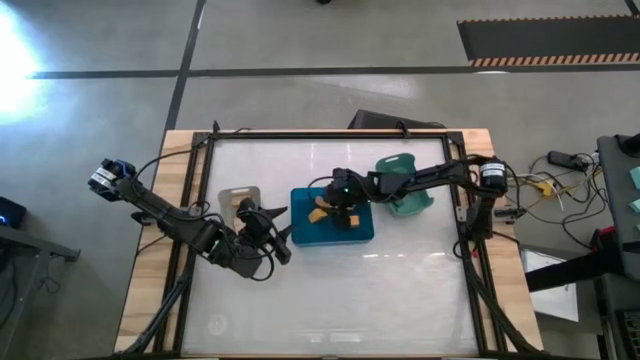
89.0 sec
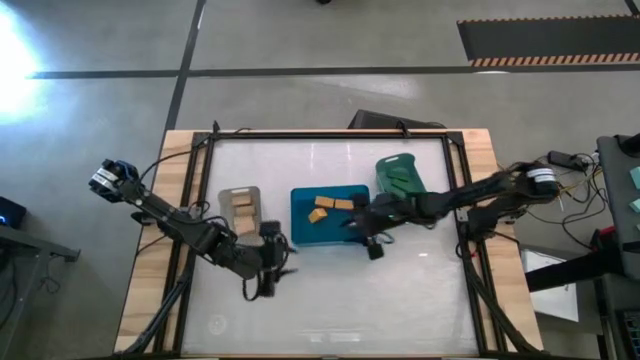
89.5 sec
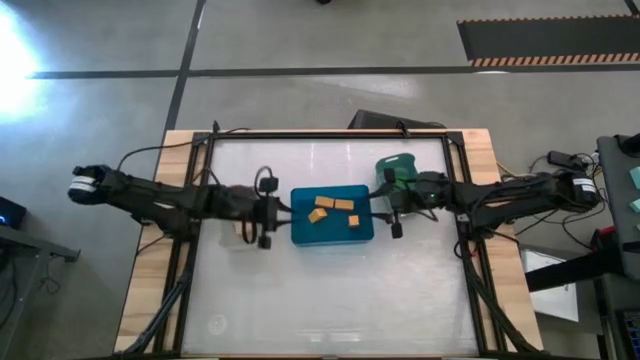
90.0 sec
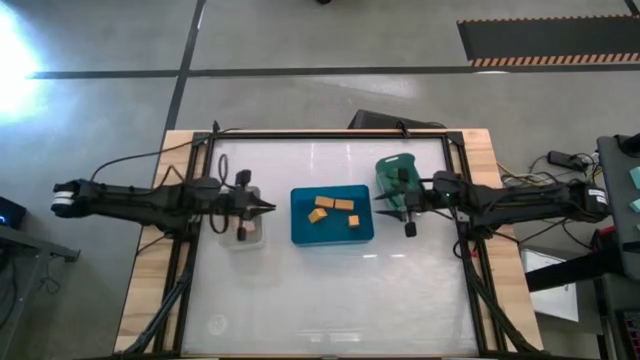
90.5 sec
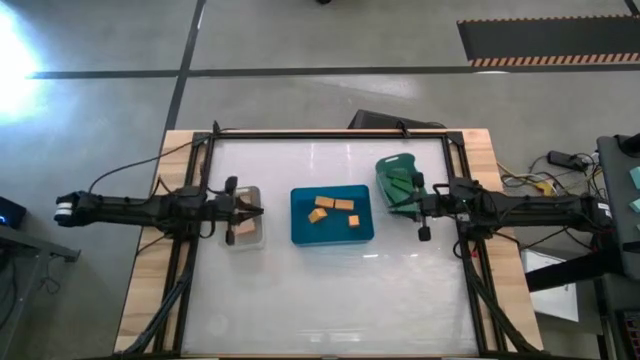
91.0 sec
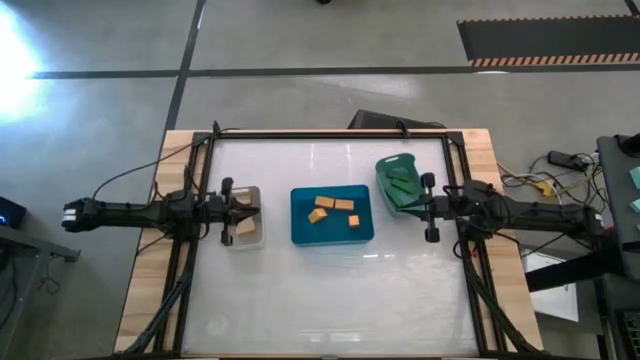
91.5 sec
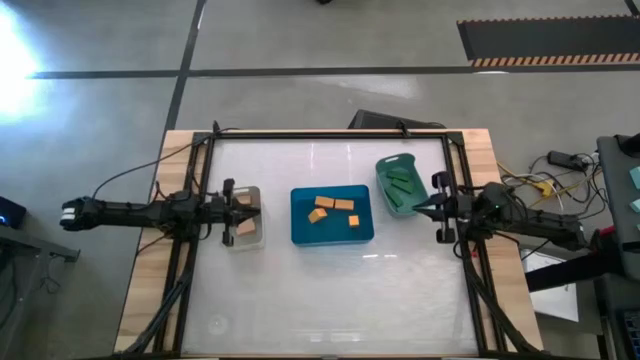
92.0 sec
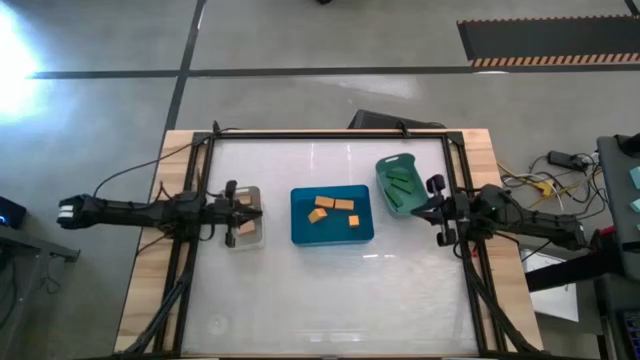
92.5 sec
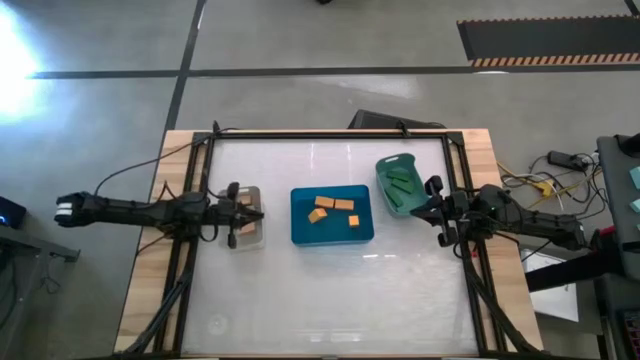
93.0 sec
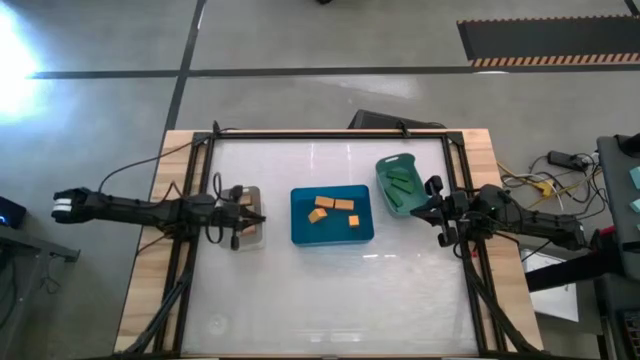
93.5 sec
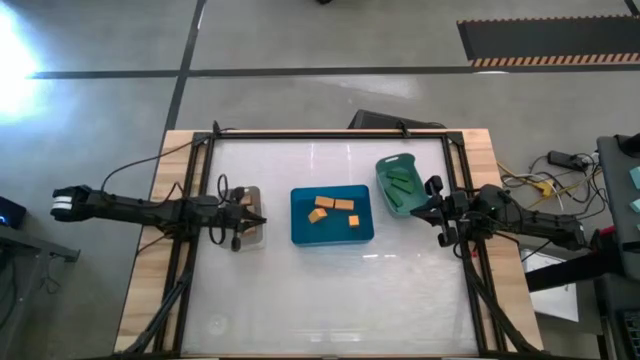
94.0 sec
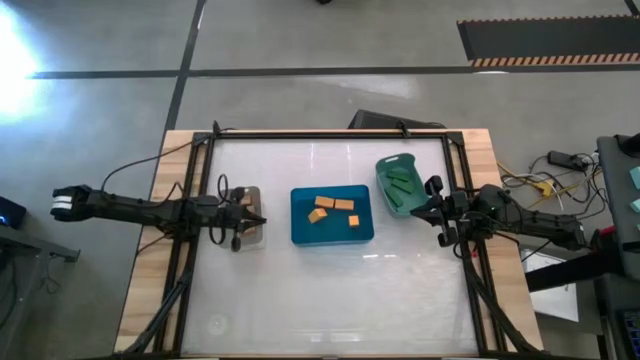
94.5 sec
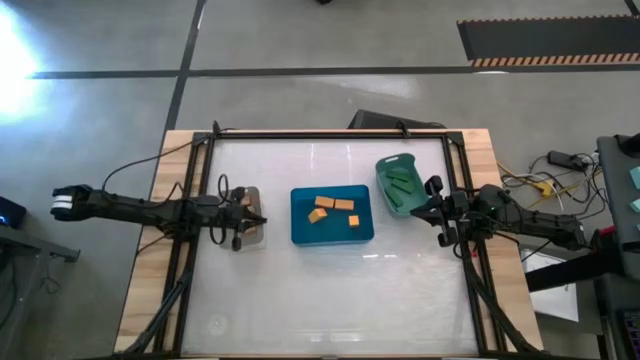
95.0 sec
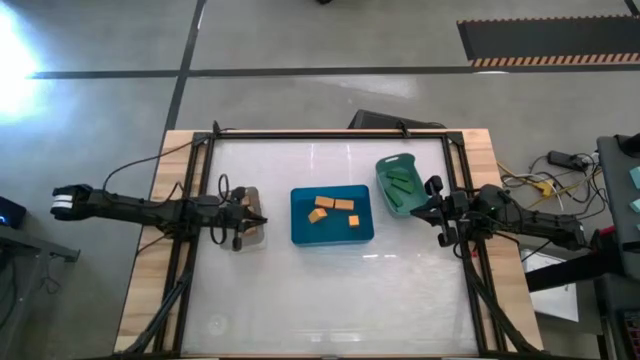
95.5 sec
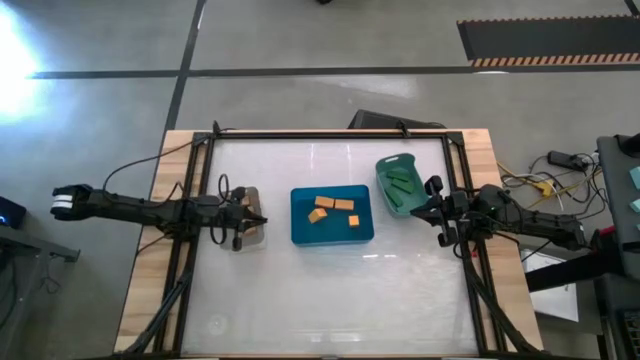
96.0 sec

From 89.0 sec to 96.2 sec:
Task: Sort & place blocks by color
Return to Home Position

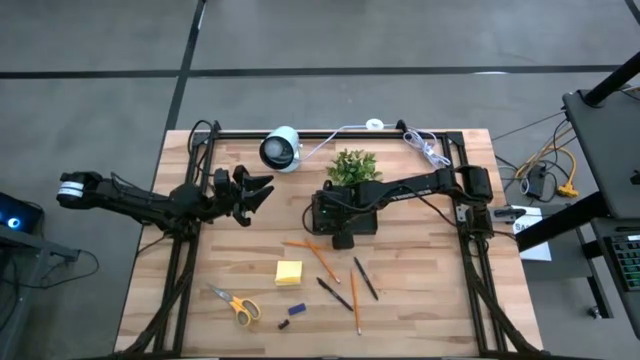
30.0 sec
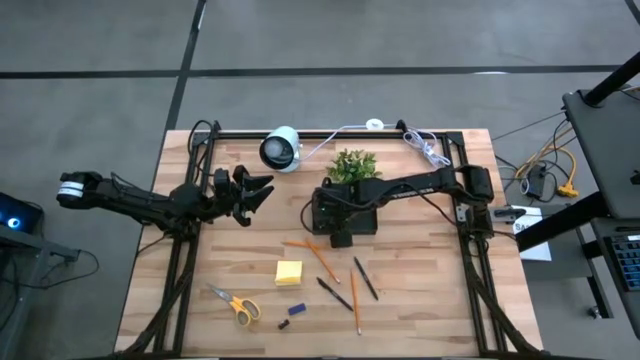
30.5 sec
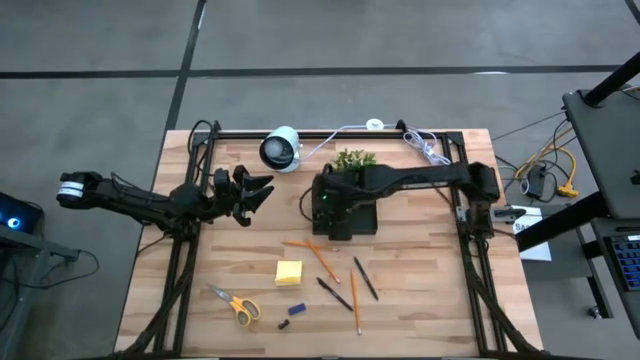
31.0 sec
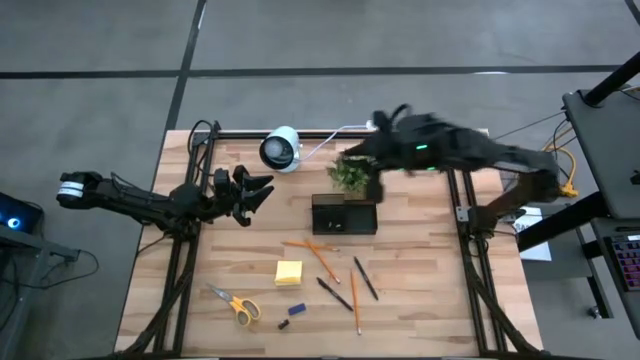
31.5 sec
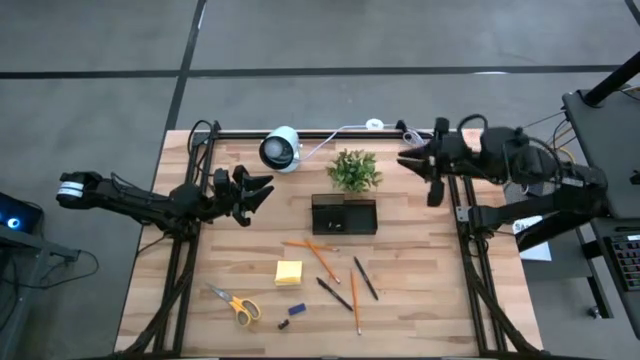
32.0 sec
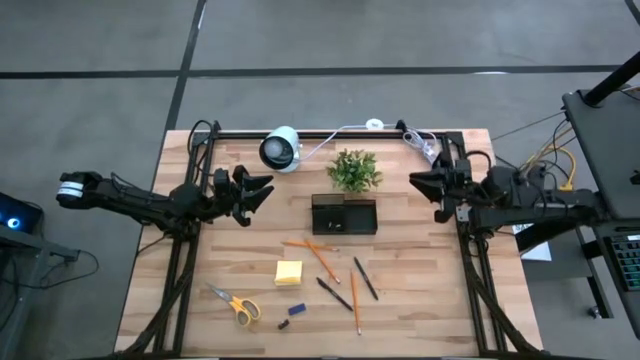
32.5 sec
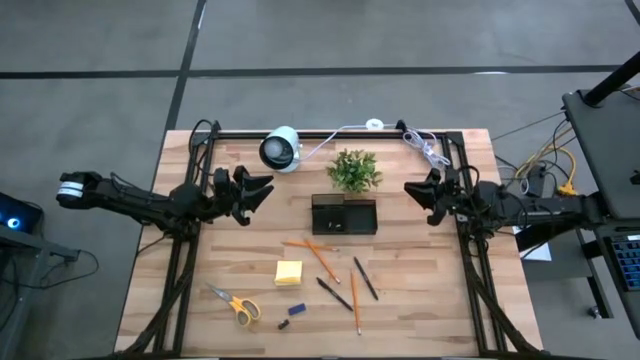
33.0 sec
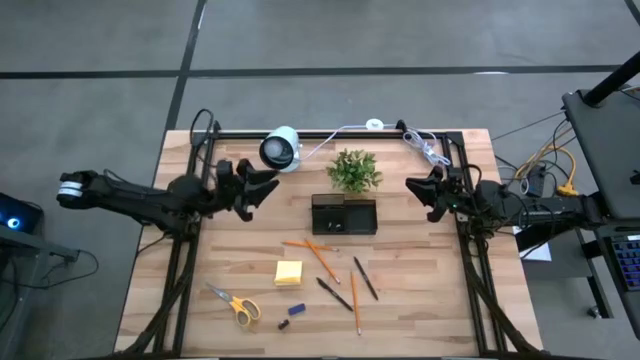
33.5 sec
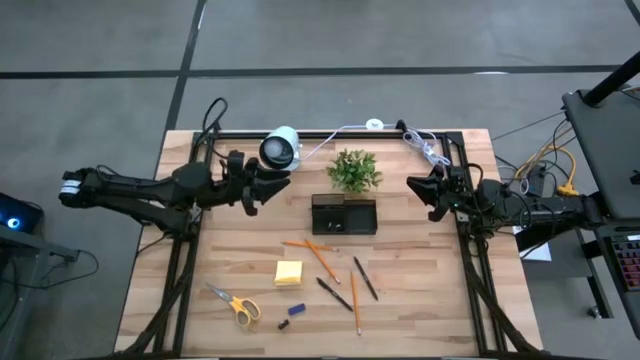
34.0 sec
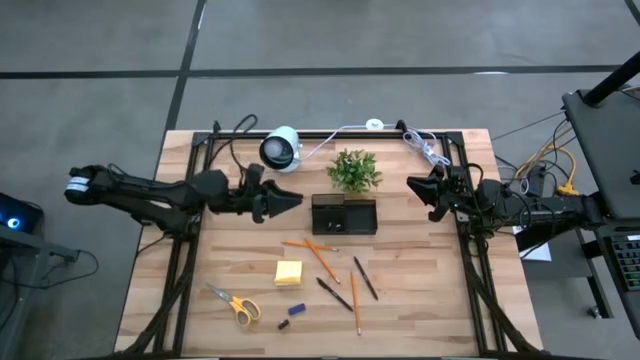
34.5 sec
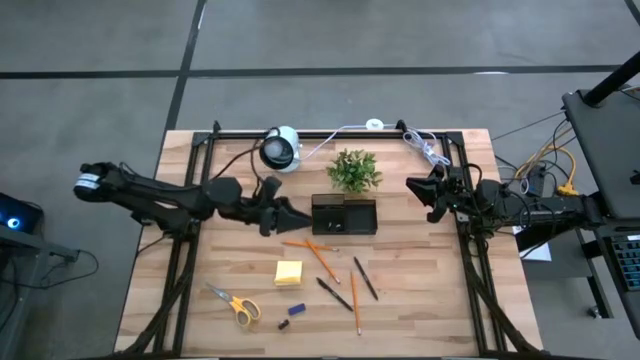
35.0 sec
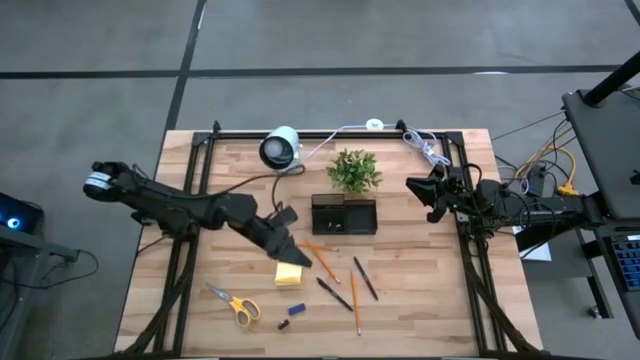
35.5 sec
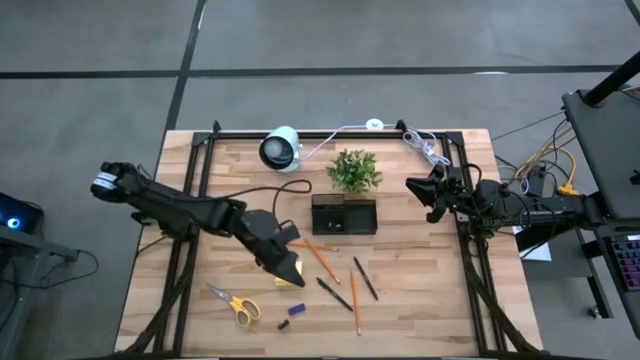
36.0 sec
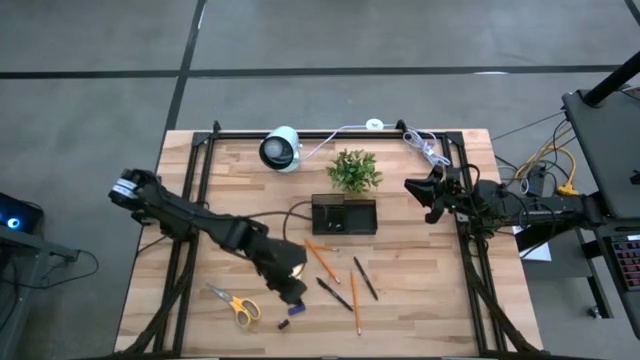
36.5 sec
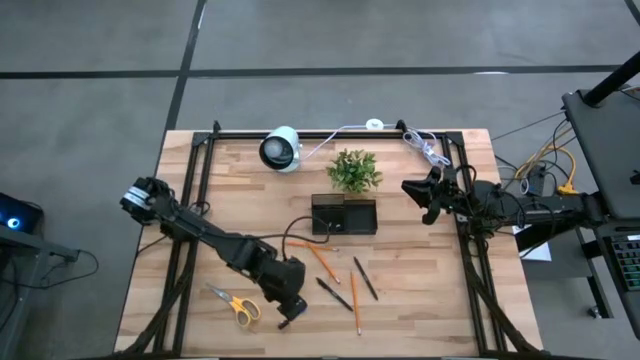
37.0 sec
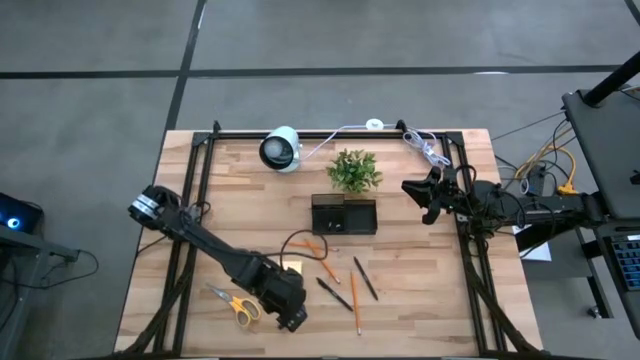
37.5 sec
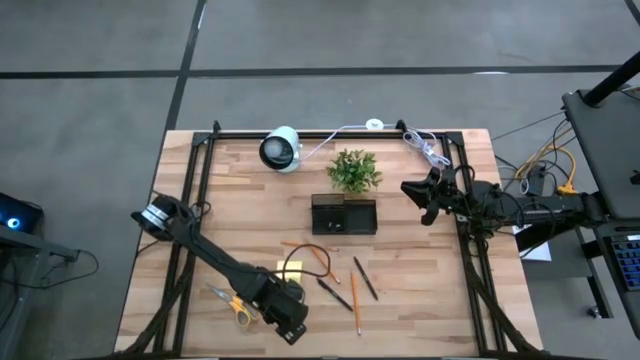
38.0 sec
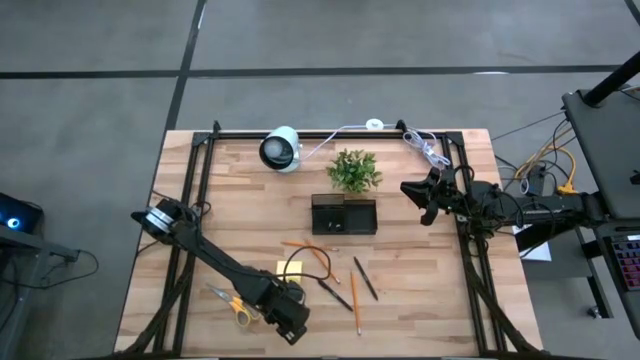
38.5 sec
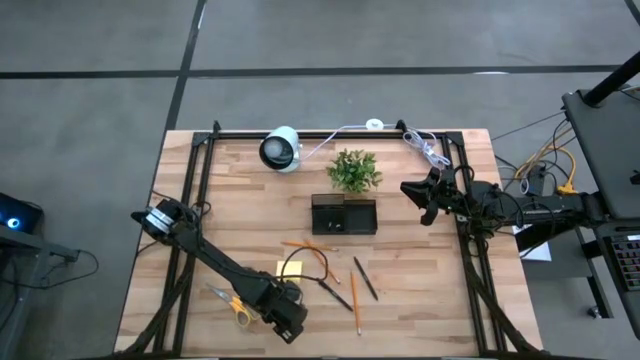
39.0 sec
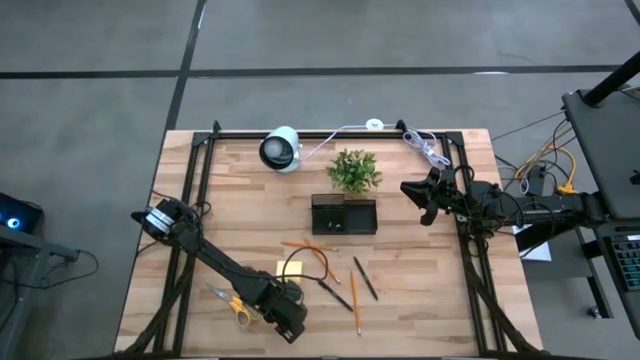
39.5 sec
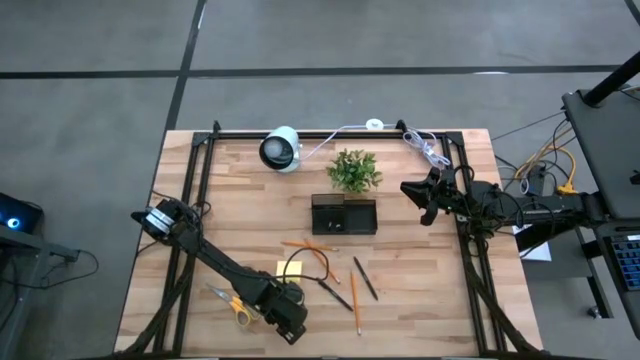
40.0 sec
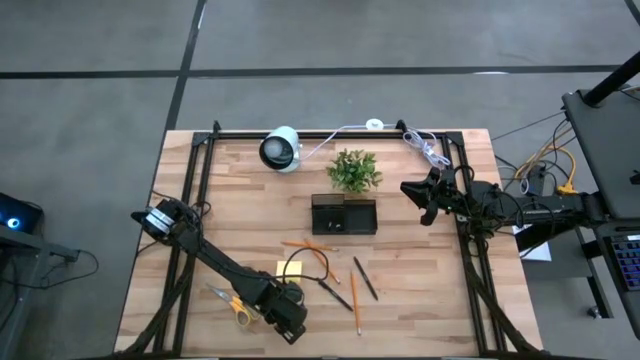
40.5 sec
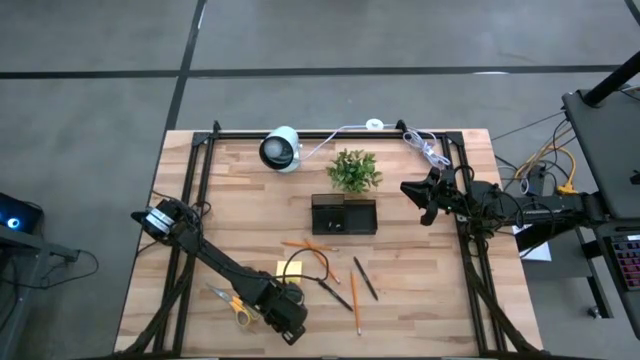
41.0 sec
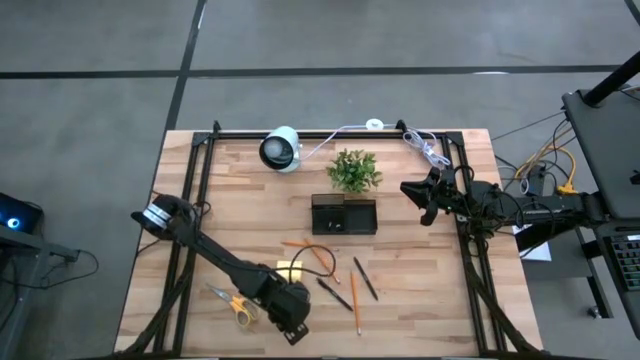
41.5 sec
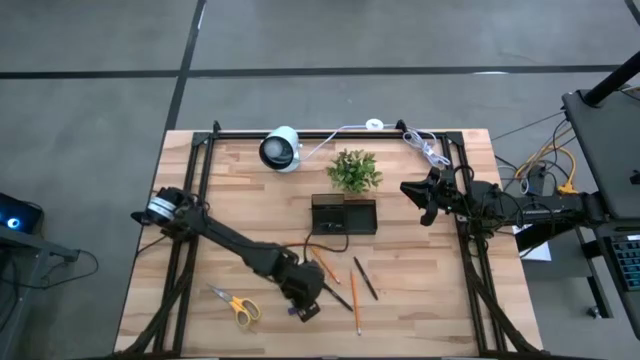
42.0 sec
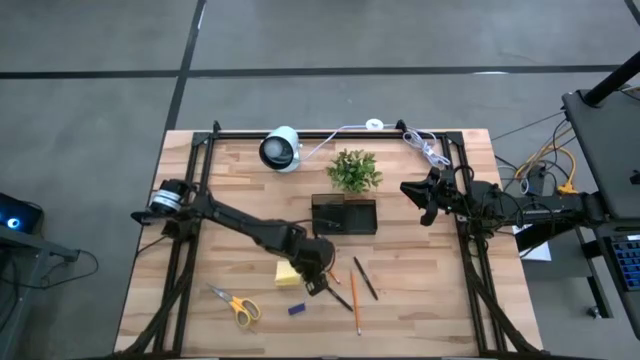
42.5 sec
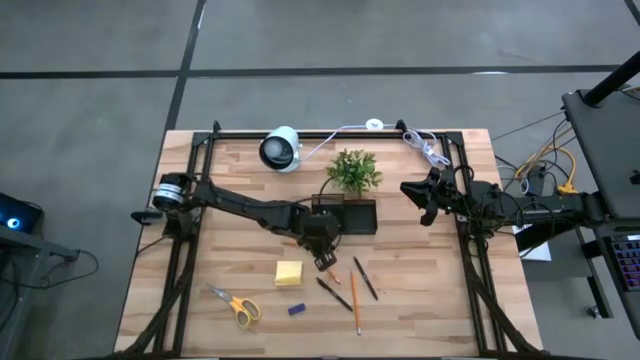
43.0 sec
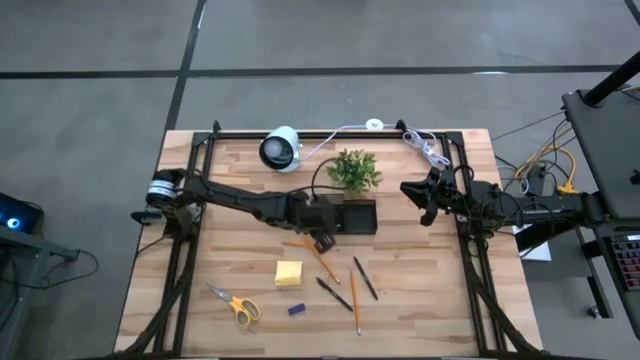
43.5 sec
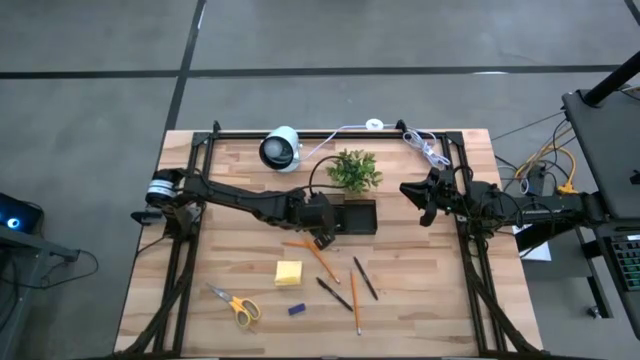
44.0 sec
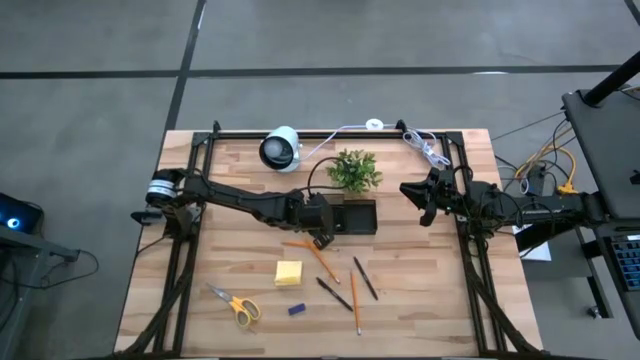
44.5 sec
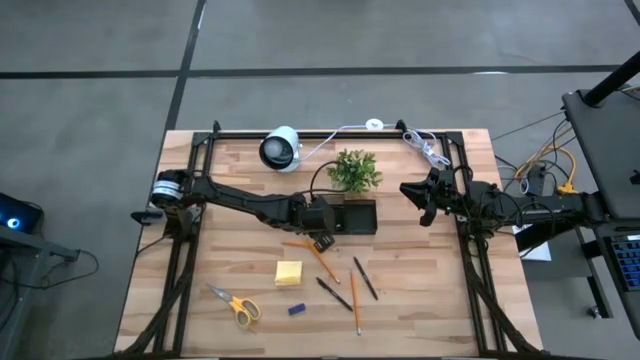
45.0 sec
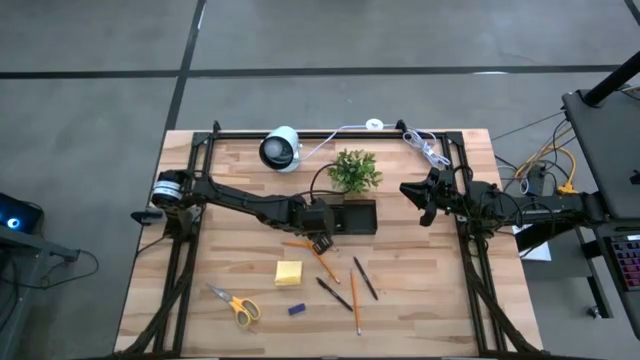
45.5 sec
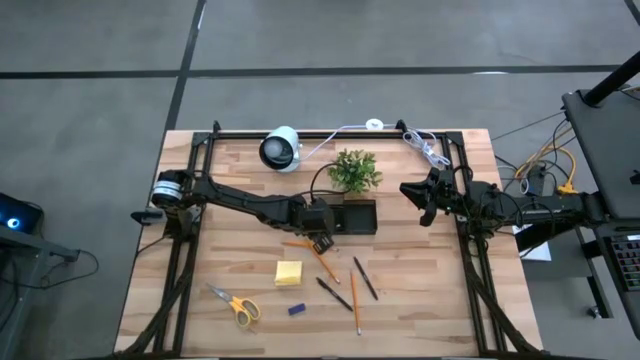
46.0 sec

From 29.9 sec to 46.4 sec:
Task: Pick and place office supplies into organizer
Put the black binder clip into the black desk organizer
